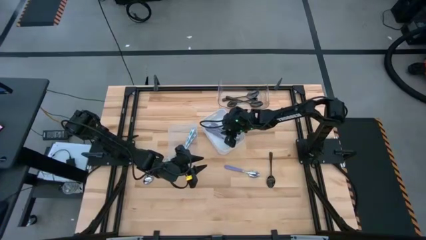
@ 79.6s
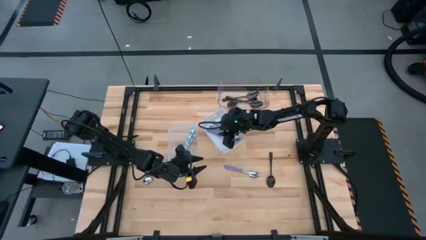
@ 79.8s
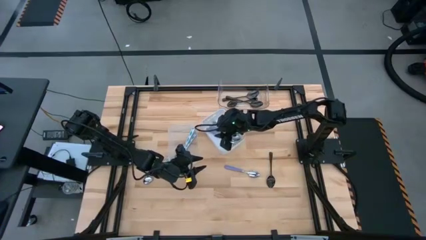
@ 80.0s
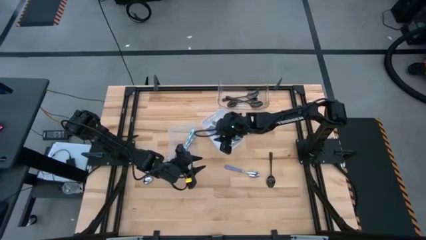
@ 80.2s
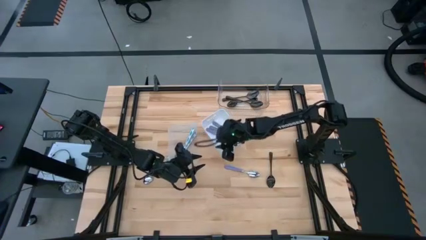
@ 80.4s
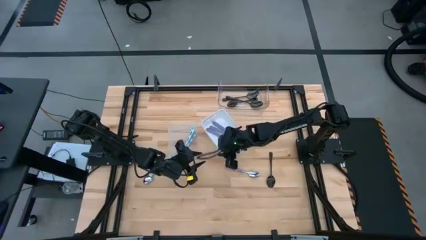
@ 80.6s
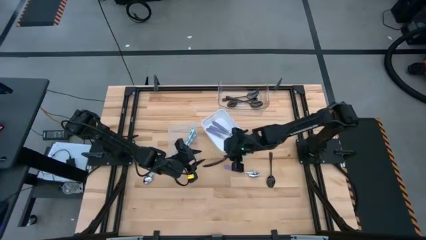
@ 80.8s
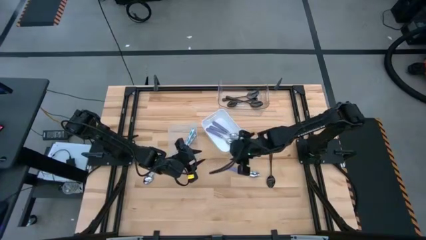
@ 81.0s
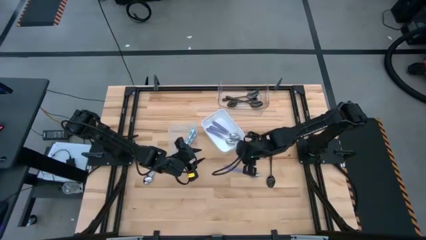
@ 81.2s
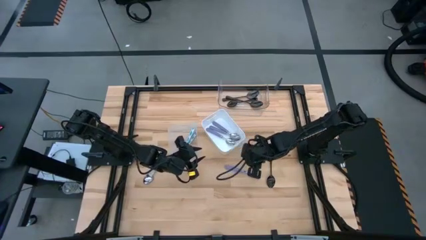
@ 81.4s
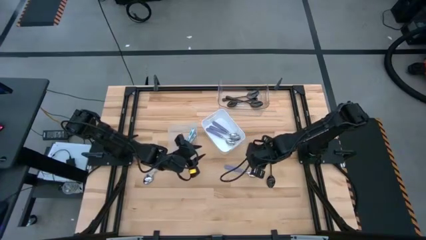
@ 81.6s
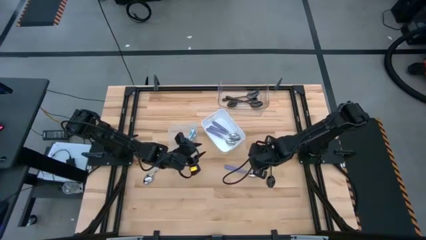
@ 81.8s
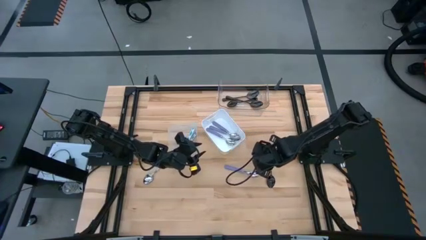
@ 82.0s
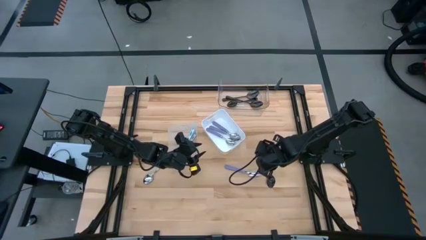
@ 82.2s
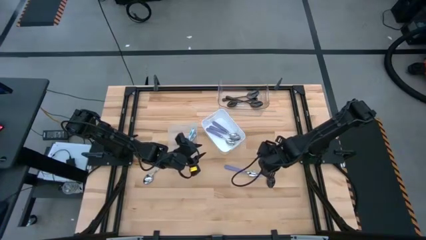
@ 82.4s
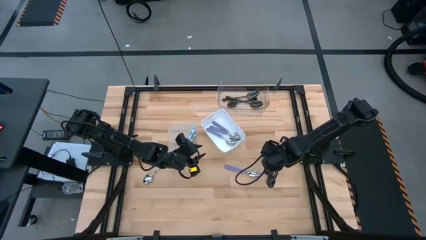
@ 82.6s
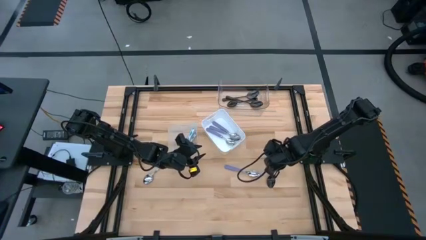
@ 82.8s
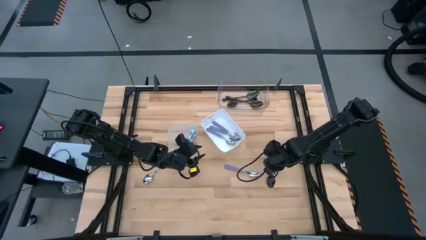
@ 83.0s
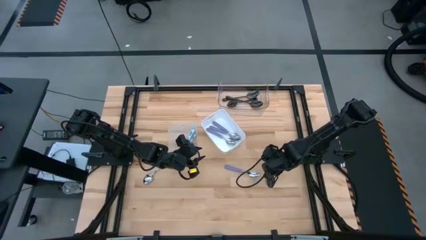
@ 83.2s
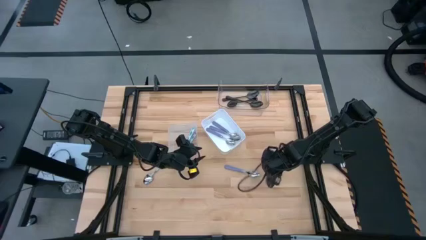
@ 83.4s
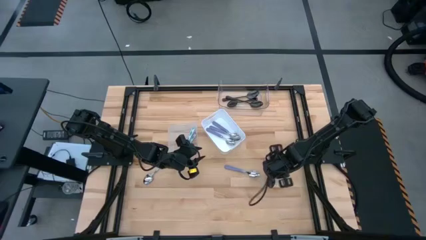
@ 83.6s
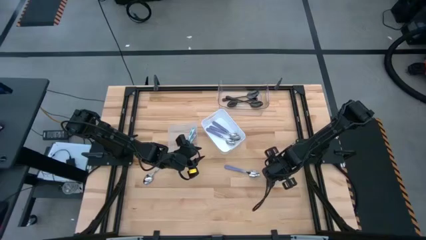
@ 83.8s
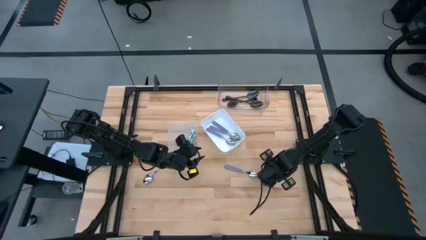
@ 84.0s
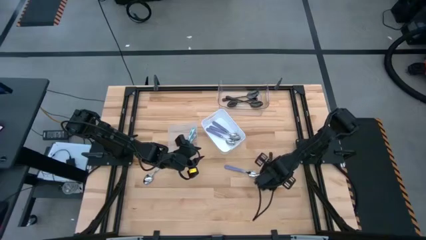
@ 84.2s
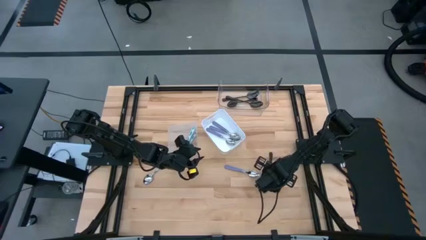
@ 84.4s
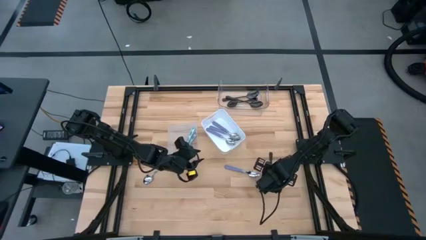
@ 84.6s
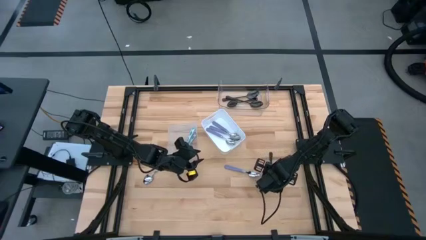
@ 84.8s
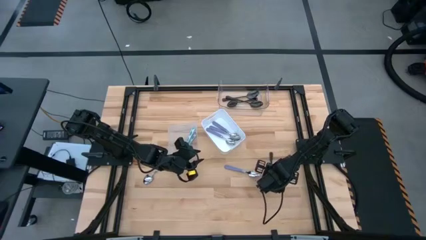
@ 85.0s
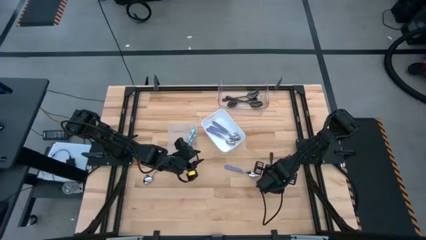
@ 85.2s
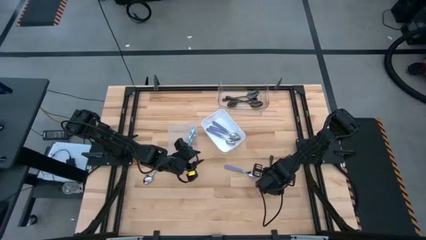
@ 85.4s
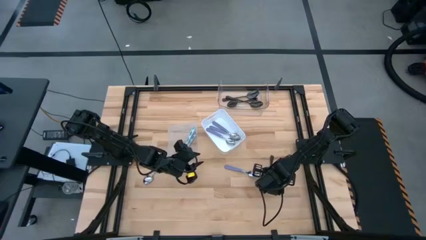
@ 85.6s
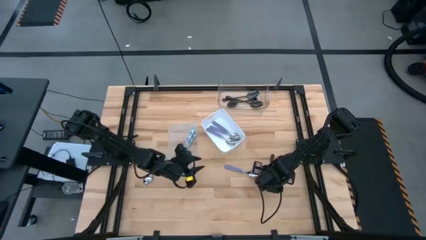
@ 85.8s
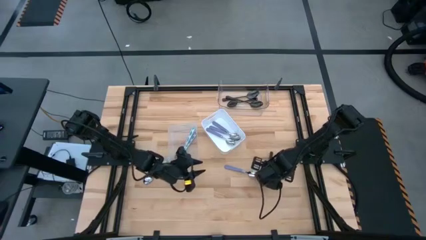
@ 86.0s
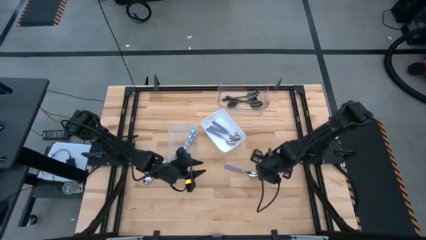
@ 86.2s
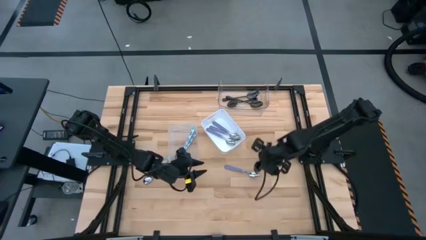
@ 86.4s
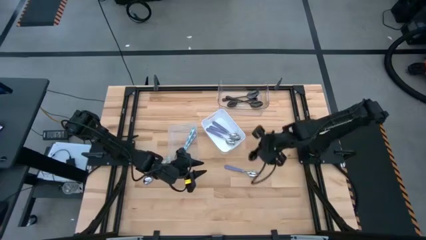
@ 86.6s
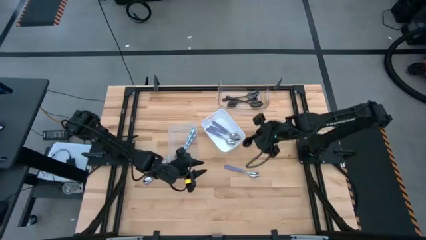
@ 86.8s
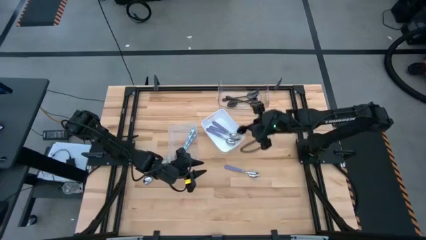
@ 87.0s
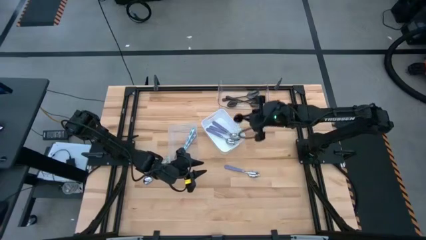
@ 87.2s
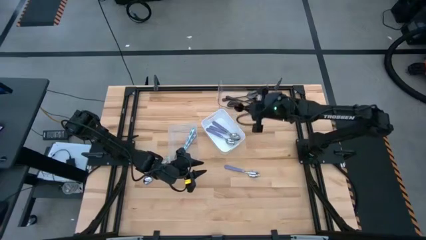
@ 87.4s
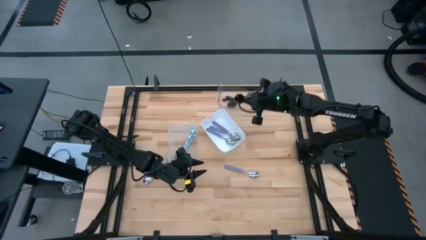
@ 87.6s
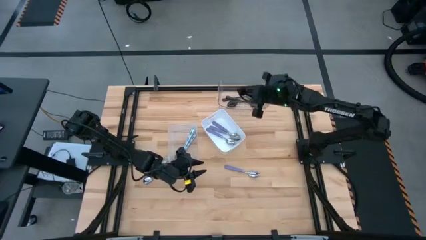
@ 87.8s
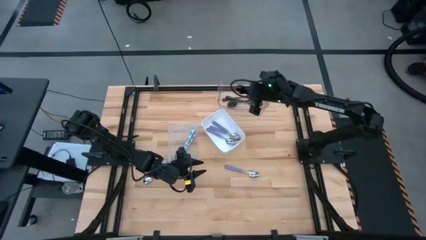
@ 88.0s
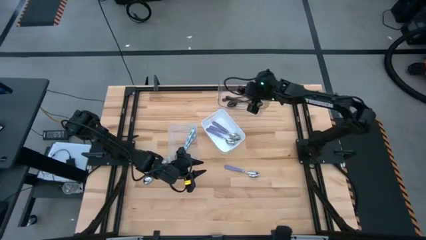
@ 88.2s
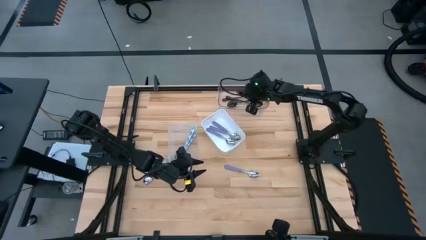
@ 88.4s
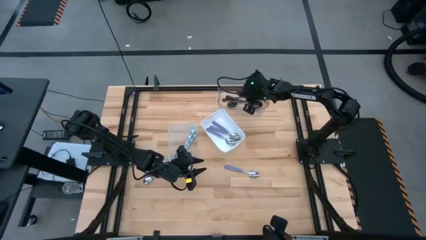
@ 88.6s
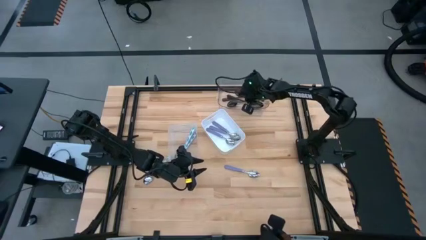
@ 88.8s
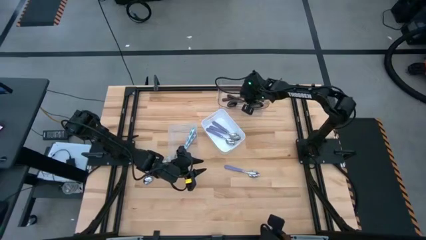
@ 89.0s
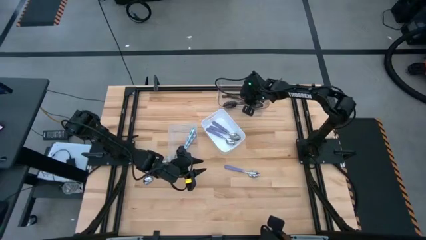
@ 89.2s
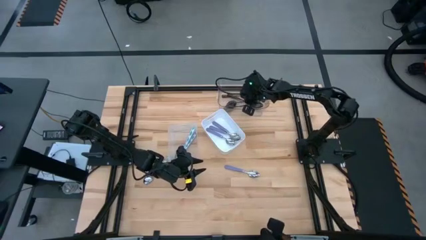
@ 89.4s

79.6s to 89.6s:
Task: Sort silverware by color (type)
Put the black spoon into the top transparent bin

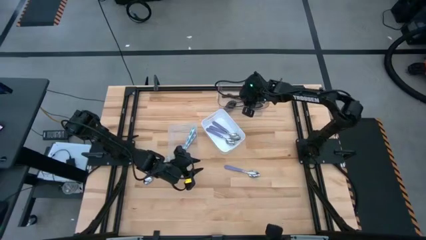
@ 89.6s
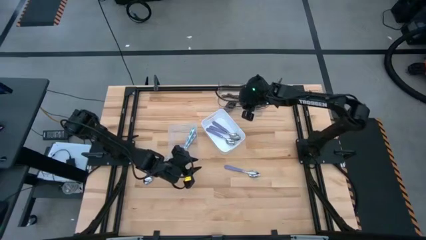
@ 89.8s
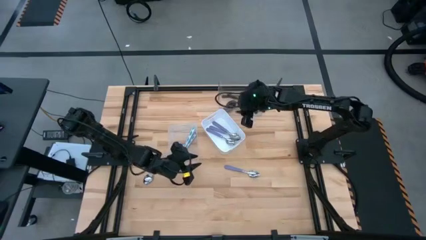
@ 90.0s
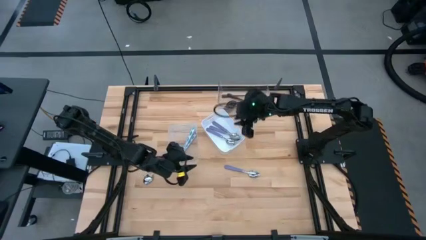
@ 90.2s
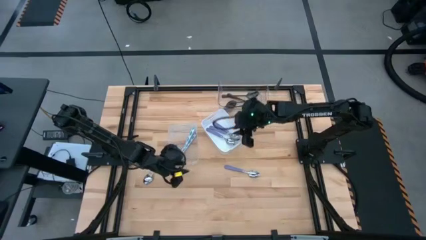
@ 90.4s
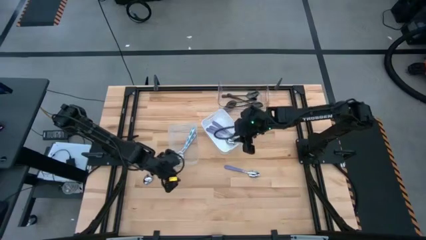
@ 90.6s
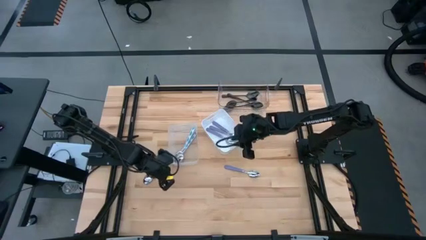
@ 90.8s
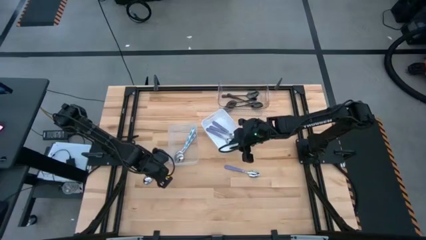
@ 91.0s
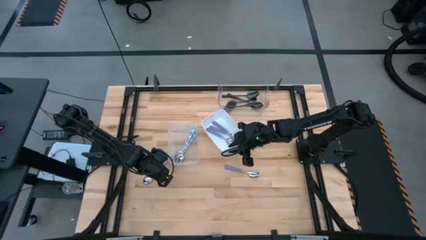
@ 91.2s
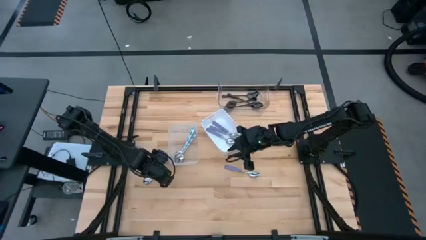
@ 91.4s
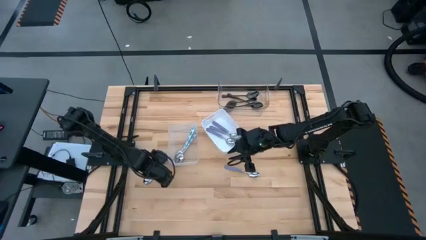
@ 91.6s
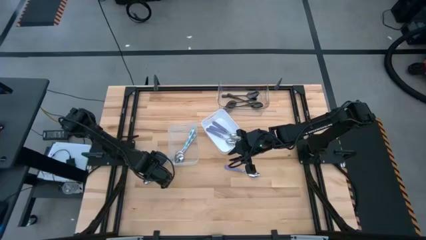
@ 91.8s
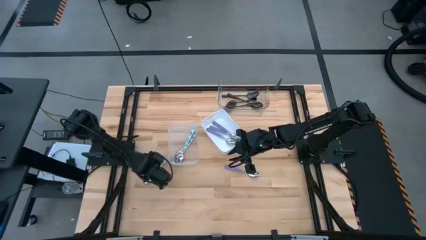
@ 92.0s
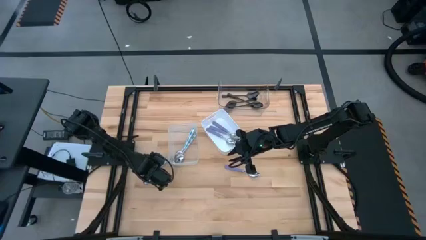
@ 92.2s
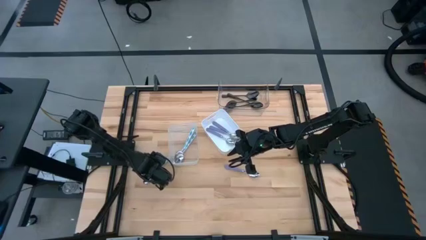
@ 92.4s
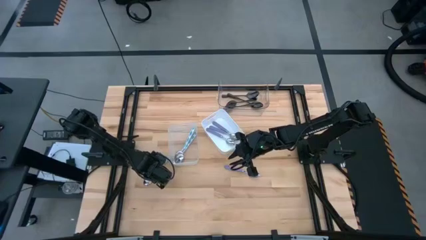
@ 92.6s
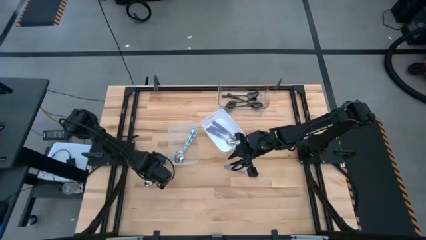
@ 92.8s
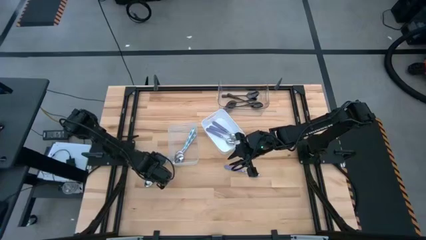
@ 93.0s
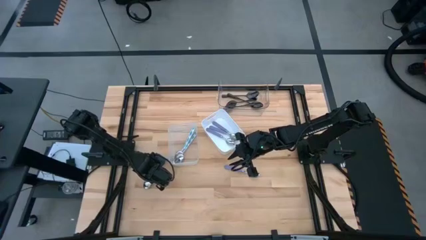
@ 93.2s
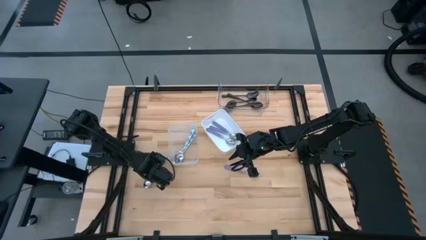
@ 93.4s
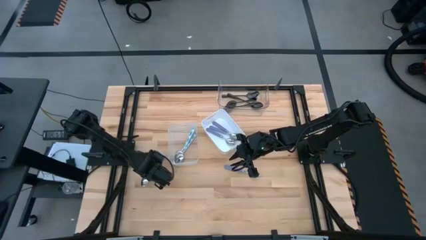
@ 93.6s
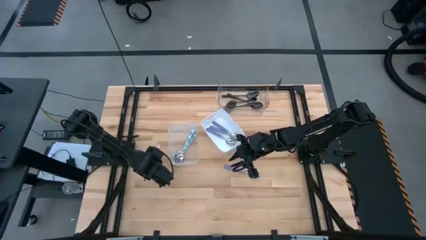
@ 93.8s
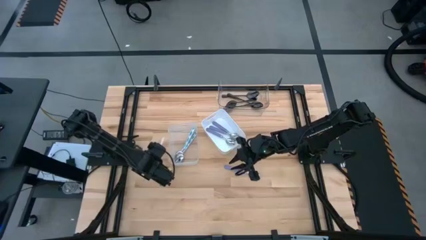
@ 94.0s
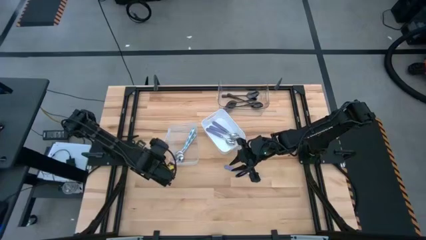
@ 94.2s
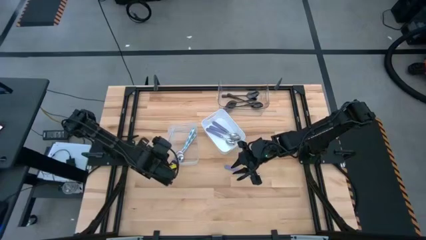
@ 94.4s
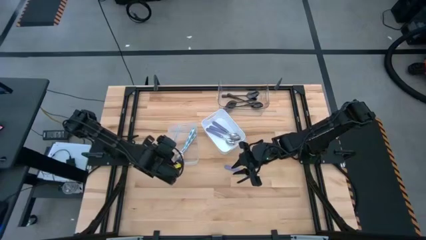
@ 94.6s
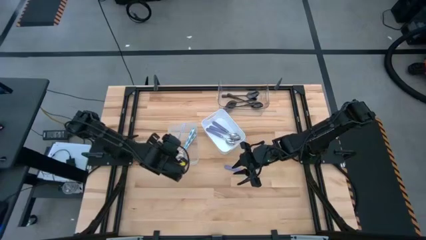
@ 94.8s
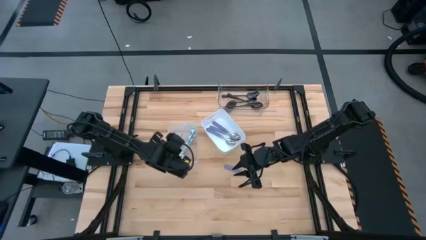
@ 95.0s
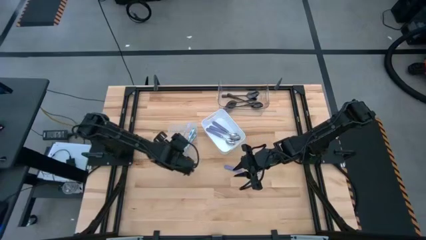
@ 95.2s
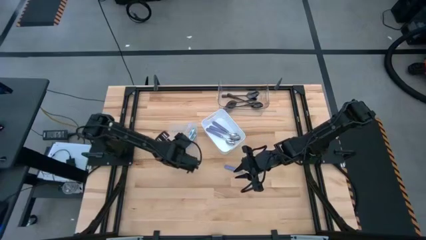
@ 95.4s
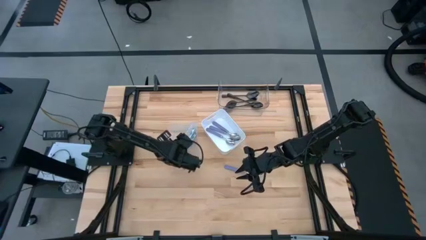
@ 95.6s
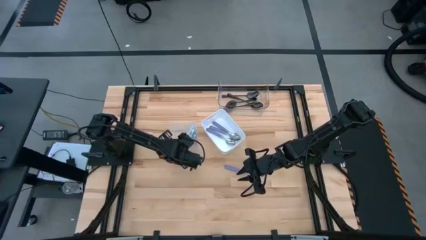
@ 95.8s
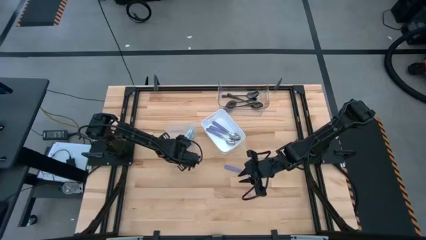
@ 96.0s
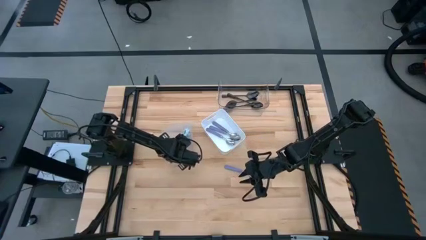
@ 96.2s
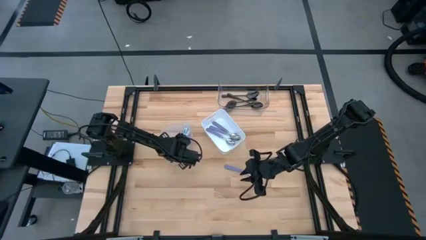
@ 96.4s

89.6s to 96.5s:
Put the white-green patterned spoon into the bottom transparent bin
